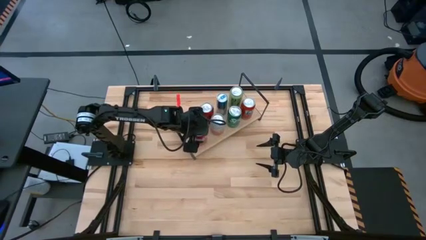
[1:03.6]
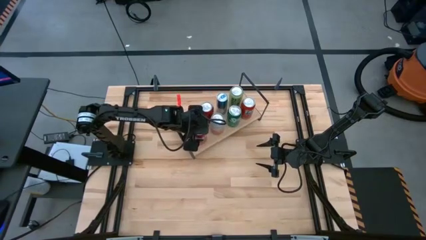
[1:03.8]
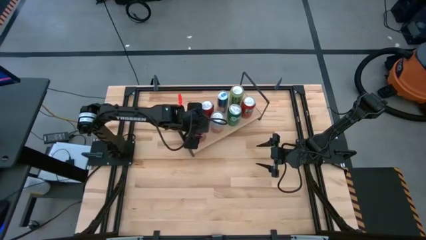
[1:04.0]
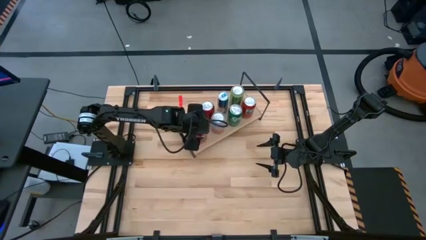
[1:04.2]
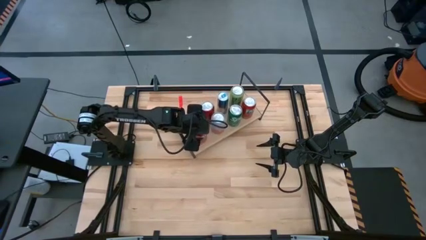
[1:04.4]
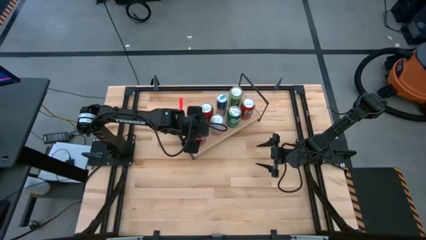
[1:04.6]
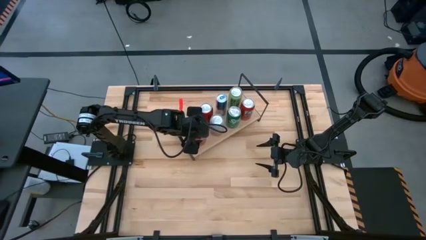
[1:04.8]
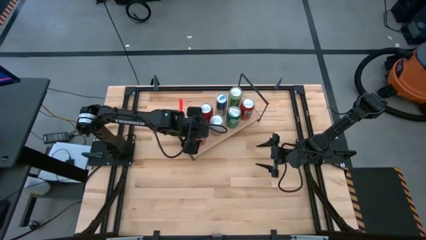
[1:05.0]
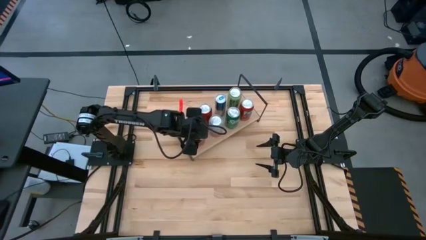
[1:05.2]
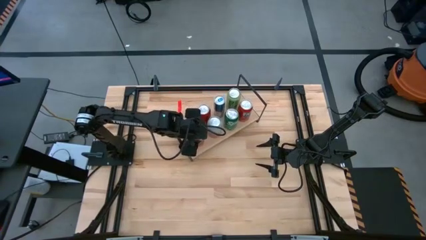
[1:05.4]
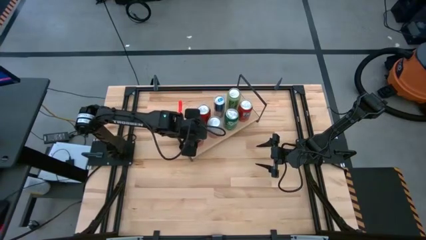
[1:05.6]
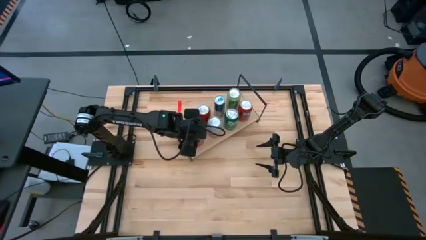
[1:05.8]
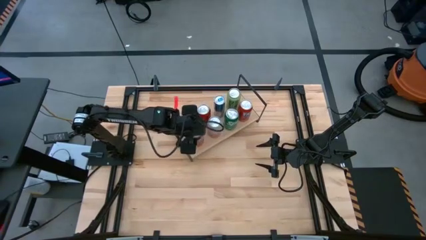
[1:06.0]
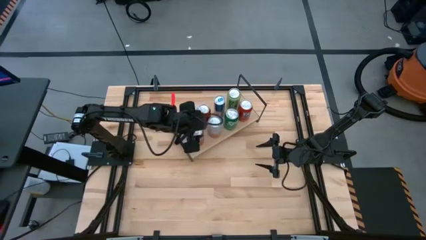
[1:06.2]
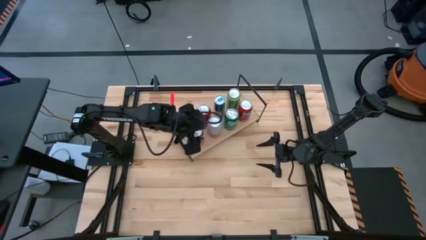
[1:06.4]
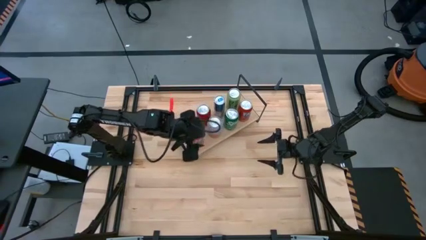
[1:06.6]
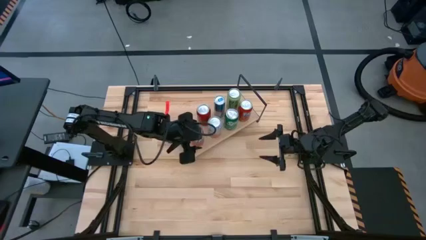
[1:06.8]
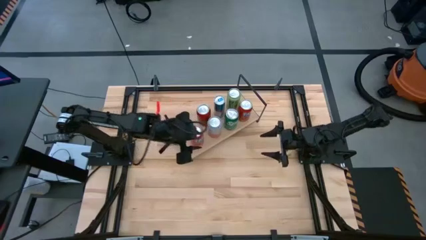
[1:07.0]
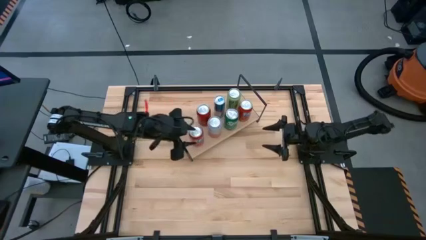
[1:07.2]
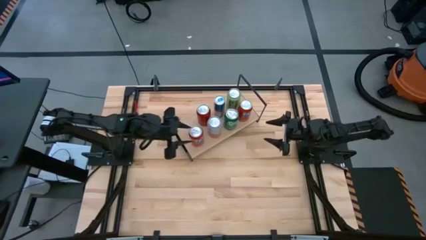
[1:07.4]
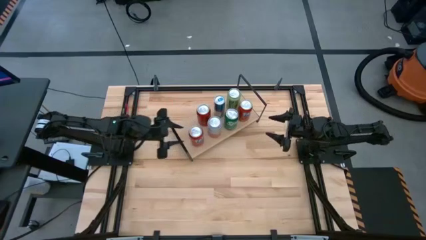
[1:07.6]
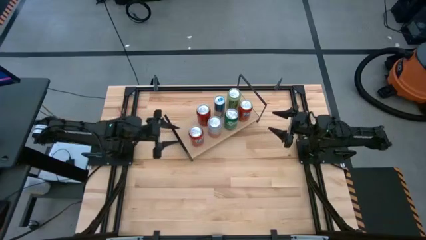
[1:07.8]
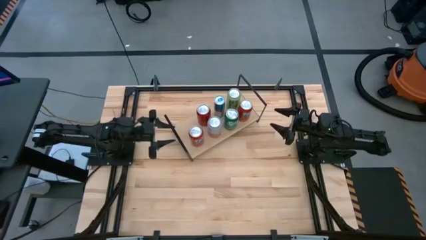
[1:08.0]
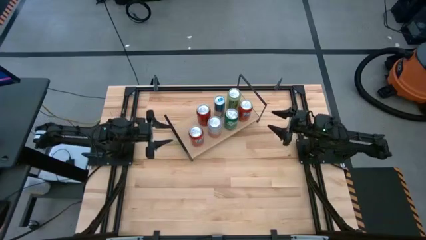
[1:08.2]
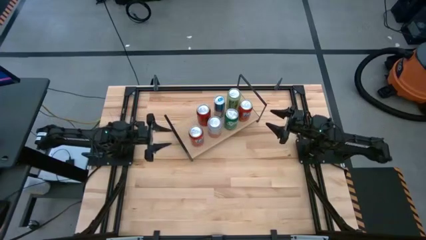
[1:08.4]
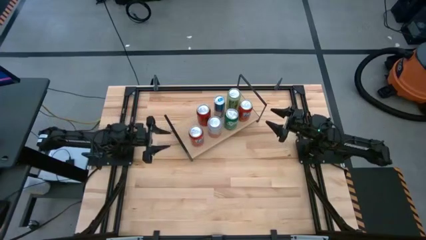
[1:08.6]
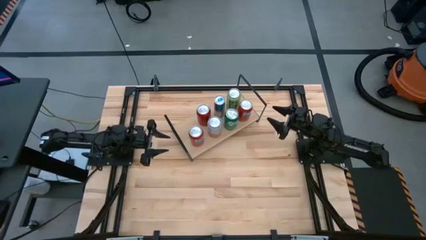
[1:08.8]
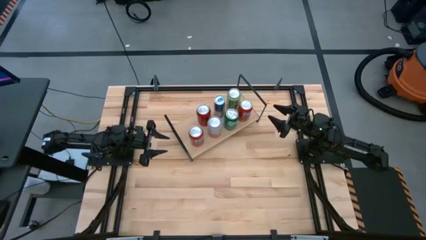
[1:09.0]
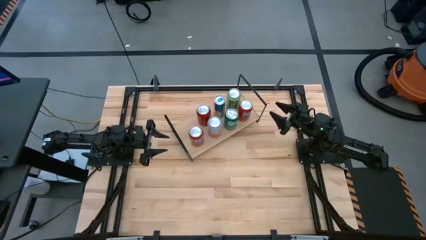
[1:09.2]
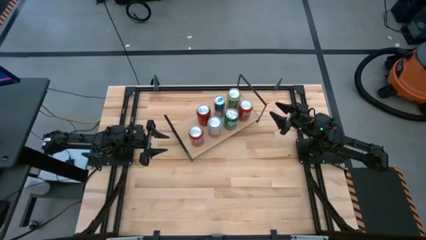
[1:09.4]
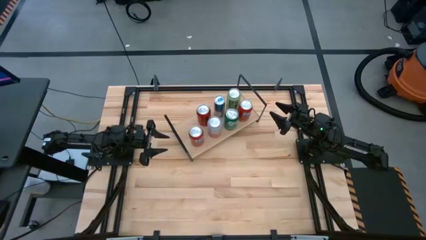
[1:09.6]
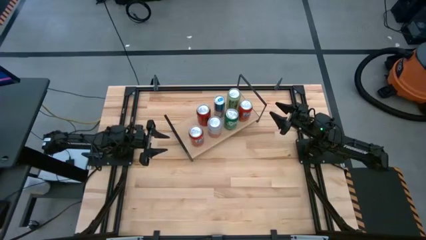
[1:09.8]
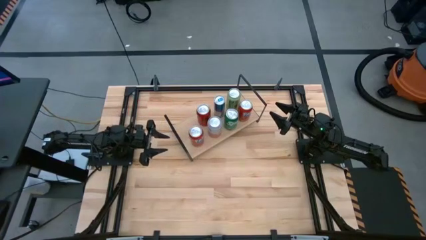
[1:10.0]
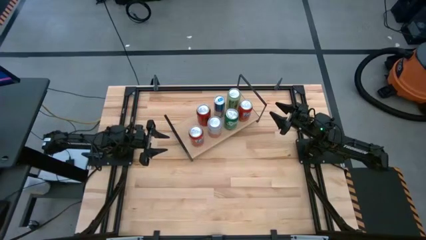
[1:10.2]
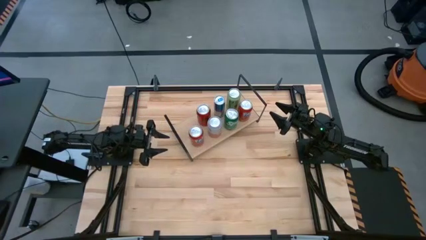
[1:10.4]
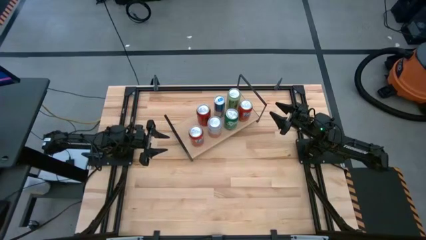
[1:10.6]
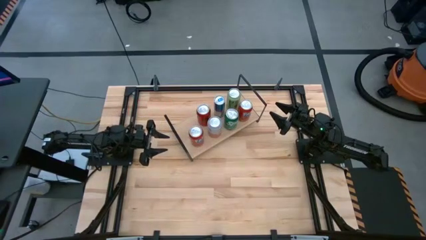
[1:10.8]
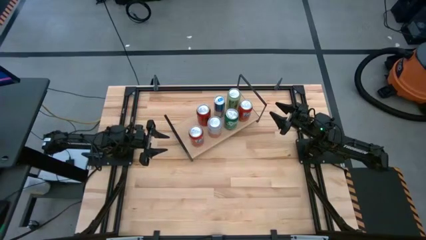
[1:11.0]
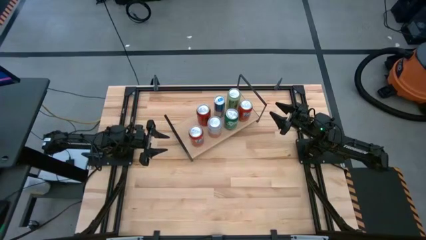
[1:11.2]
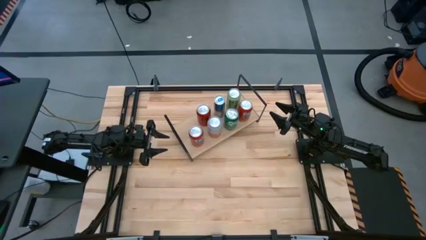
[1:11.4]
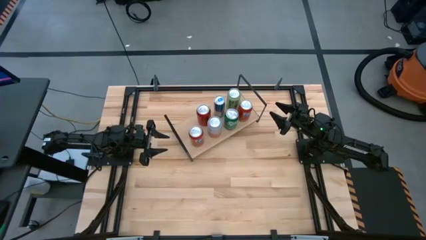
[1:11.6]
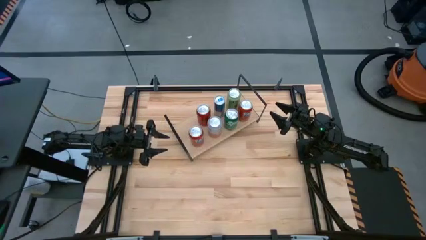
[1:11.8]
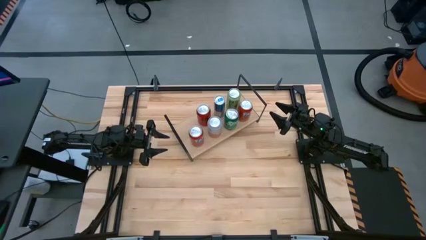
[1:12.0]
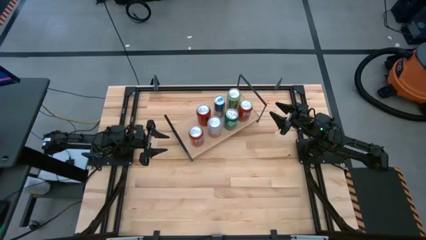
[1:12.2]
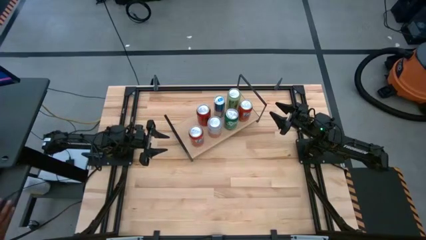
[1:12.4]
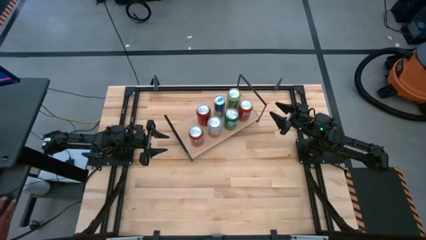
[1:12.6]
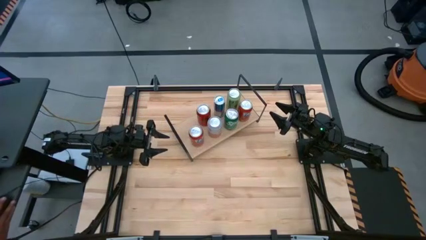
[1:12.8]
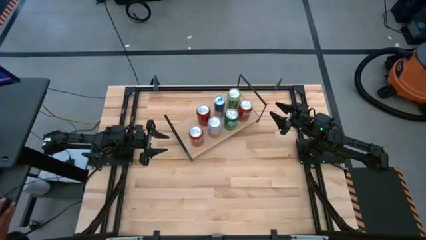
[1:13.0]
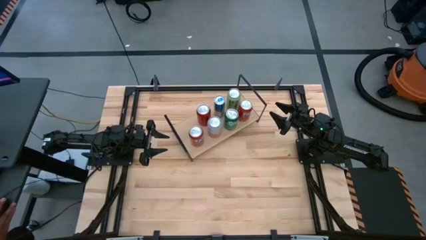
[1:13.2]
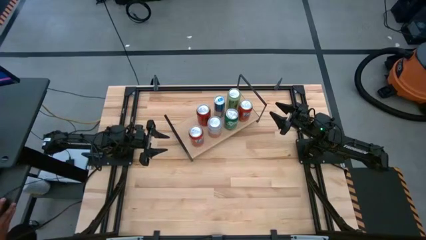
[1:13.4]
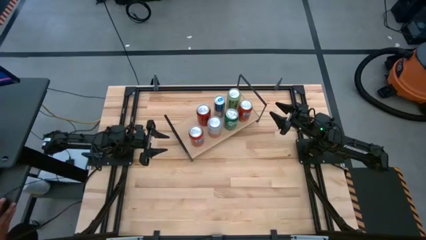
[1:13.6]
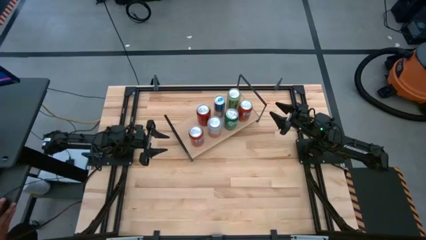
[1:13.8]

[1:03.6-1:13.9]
Task: Place canned beverage on shelf
Return to Home Position

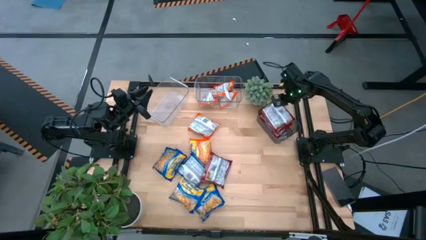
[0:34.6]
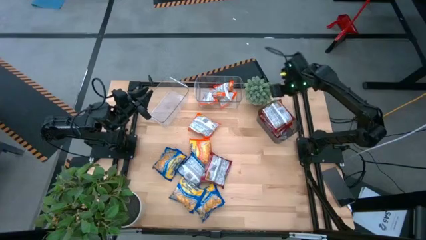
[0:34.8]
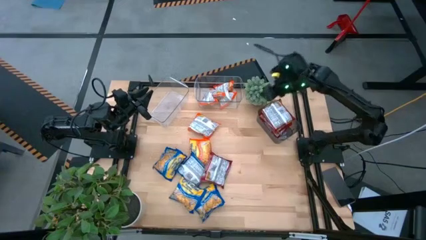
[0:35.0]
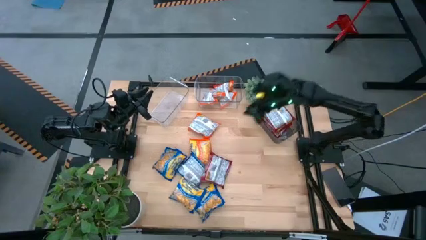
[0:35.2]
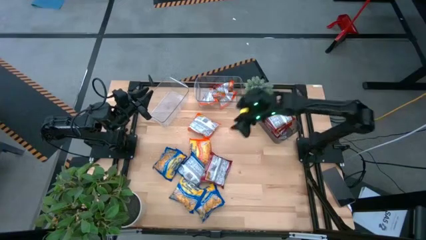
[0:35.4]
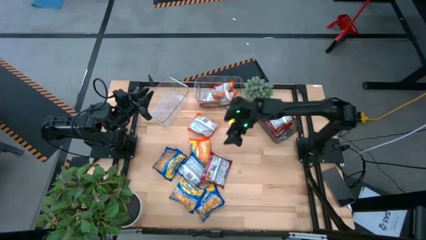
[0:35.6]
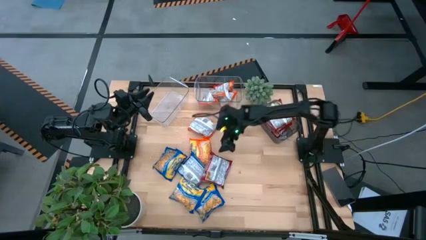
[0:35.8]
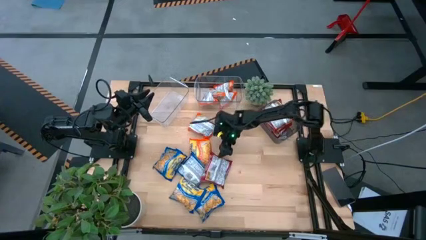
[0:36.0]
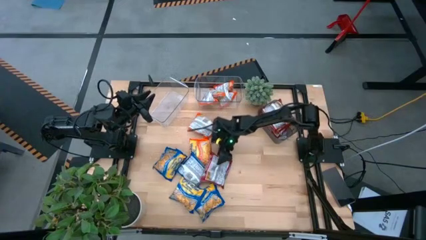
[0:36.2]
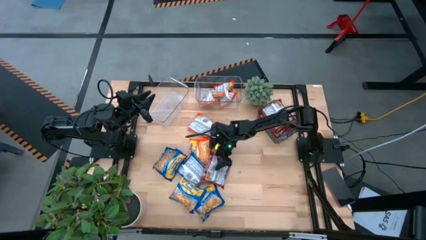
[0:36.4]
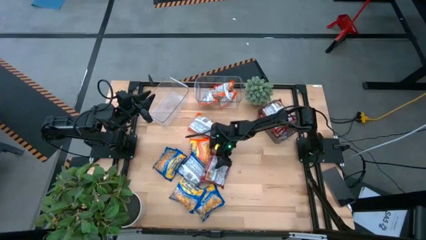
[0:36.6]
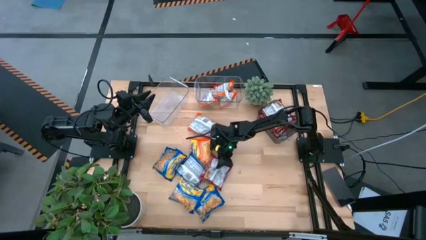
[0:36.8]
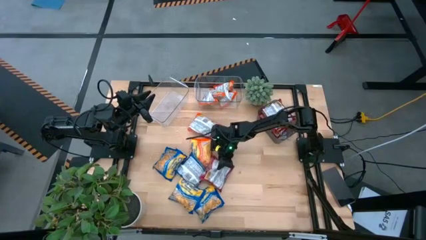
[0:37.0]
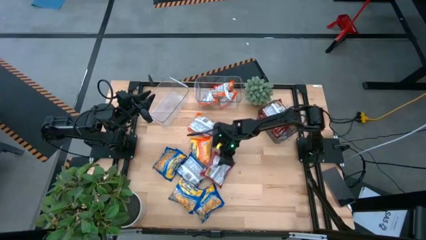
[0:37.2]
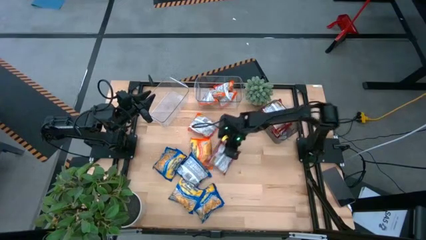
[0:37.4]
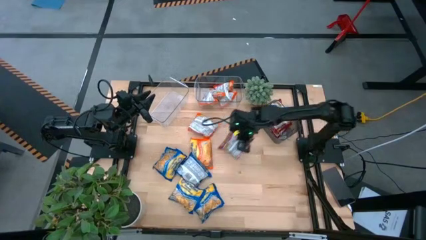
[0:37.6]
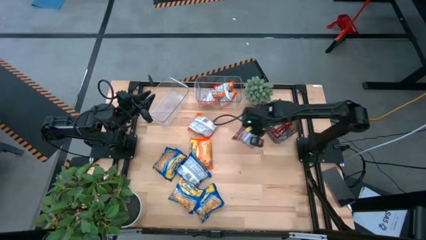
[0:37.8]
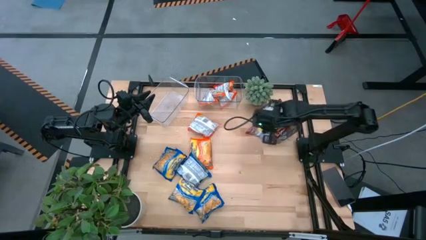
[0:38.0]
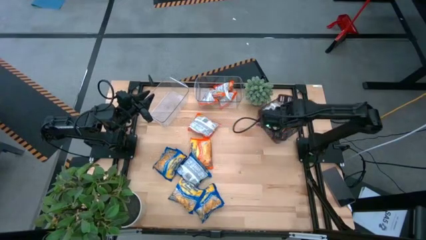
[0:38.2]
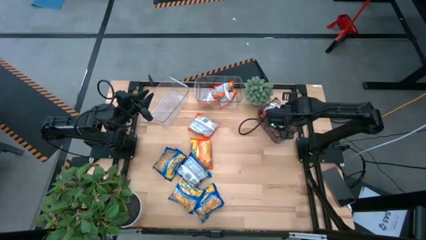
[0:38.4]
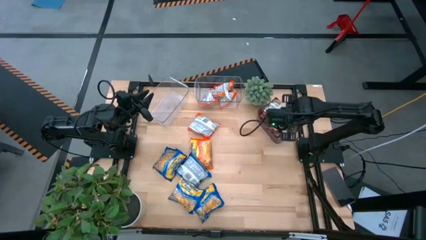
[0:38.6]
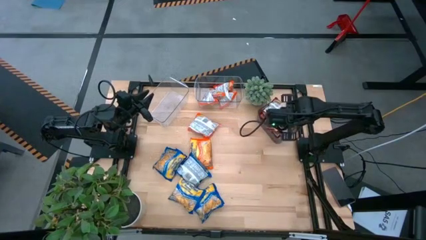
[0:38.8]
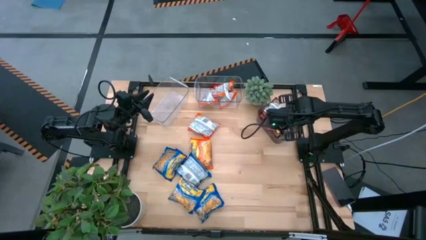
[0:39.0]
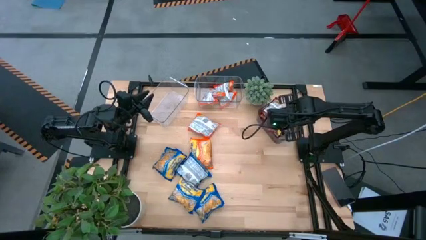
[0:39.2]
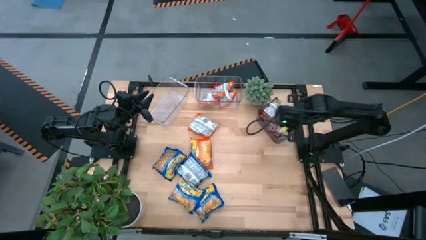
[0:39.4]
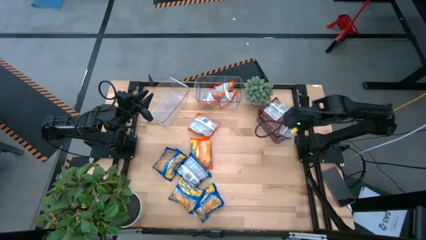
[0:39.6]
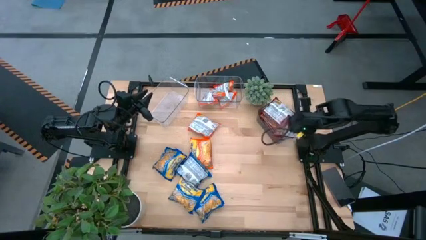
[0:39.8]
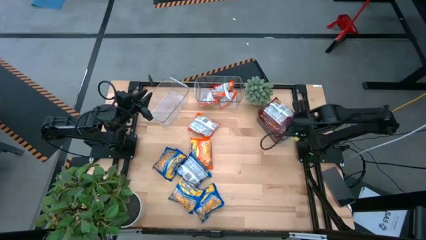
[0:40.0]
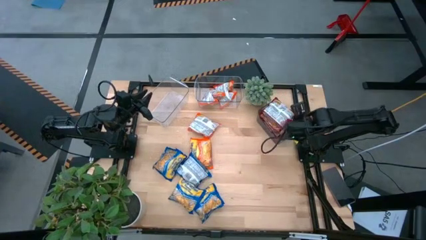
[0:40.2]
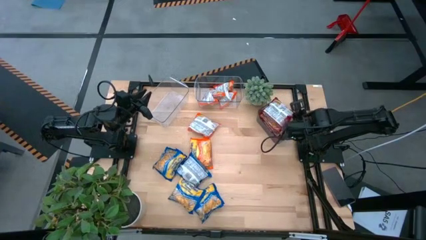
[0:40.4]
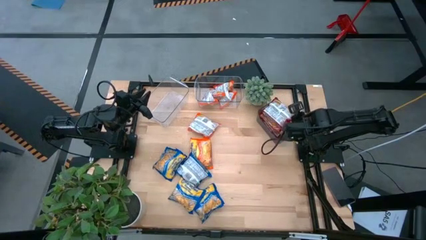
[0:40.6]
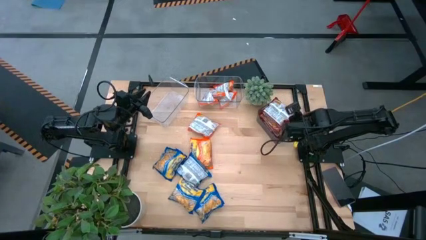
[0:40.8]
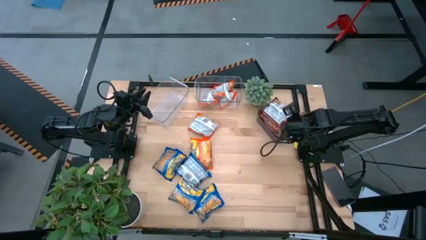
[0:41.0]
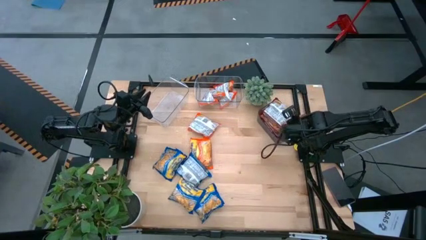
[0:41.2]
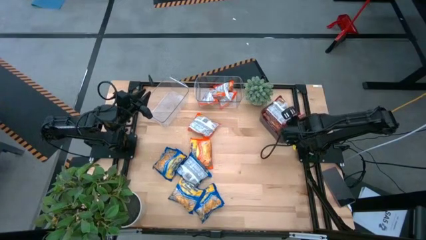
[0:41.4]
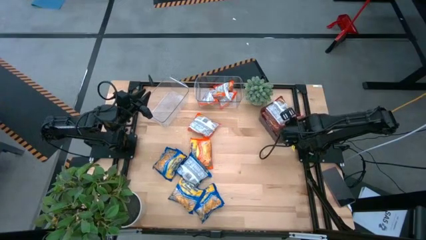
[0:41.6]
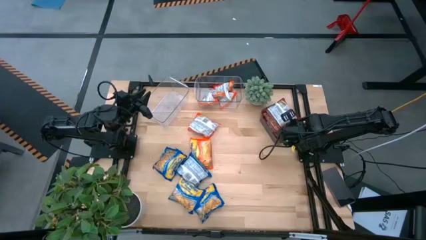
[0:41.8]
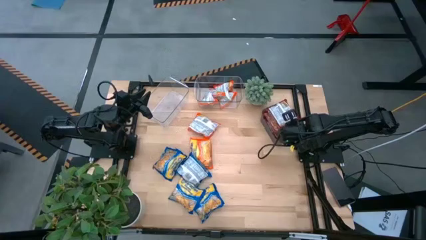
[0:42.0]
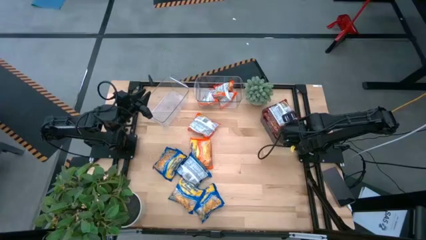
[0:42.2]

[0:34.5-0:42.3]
Task: Sort Maruchan noodles
Put the red noodle pack into the transparent black bin

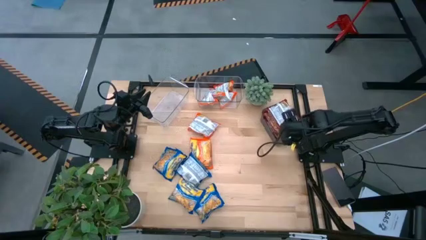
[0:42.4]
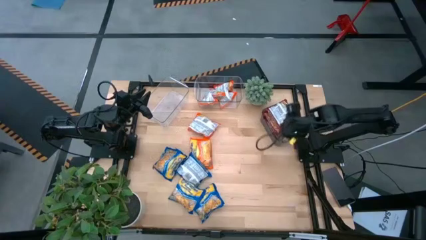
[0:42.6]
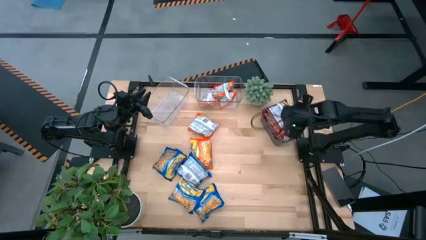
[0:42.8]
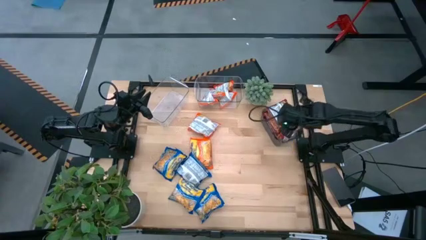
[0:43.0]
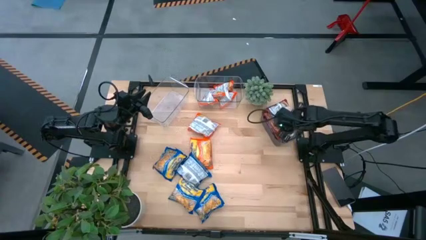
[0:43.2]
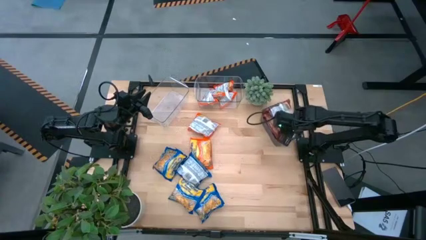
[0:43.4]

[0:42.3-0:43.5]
Adjust the red noodle pack in the transparent black bin
